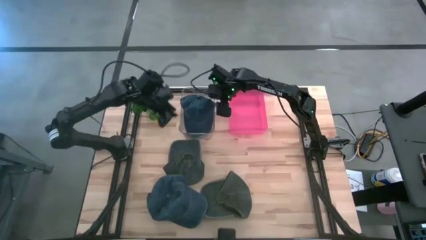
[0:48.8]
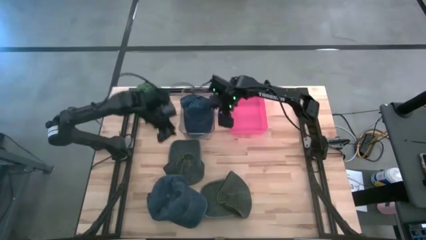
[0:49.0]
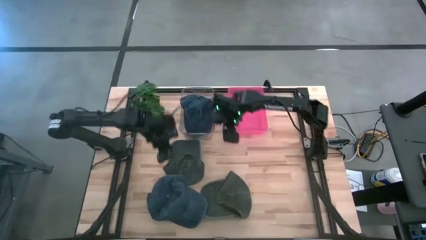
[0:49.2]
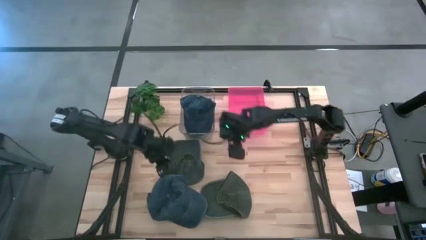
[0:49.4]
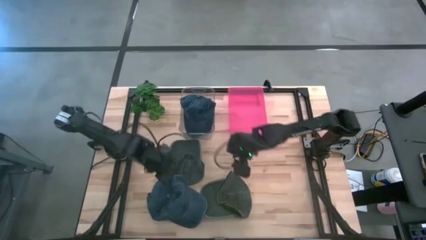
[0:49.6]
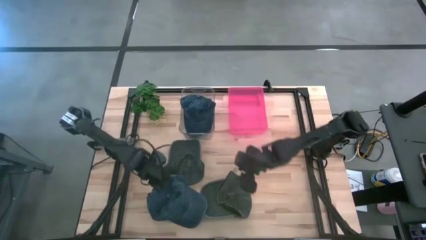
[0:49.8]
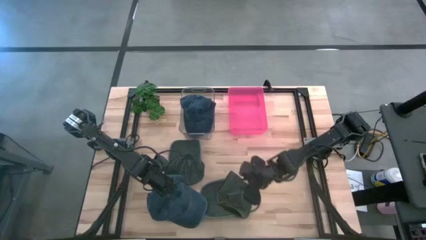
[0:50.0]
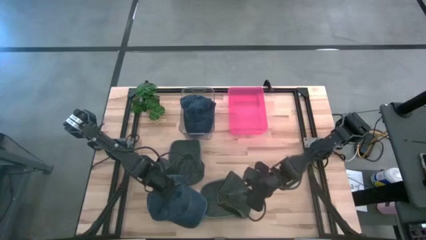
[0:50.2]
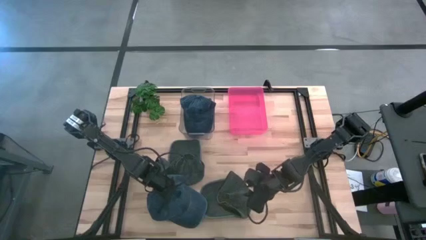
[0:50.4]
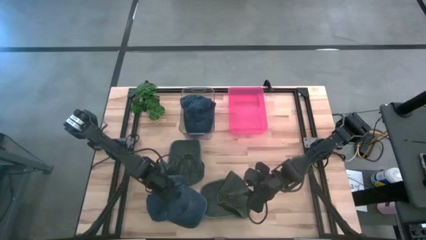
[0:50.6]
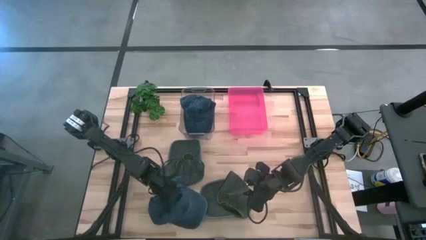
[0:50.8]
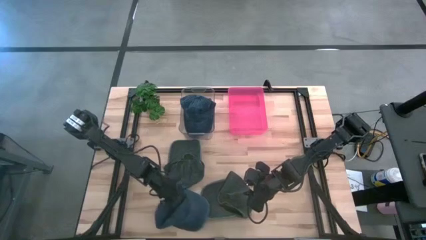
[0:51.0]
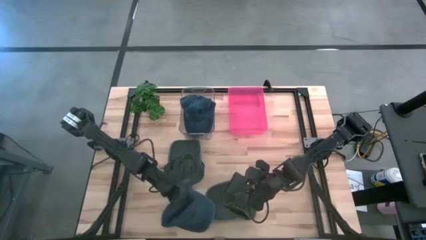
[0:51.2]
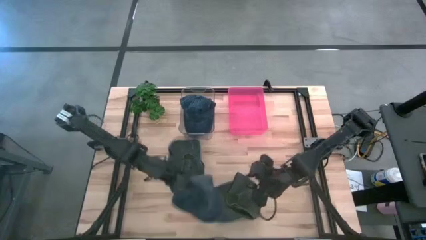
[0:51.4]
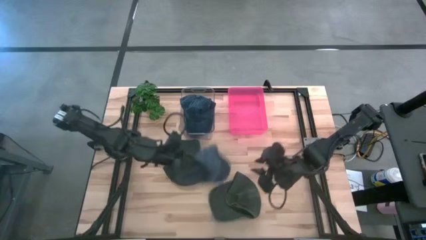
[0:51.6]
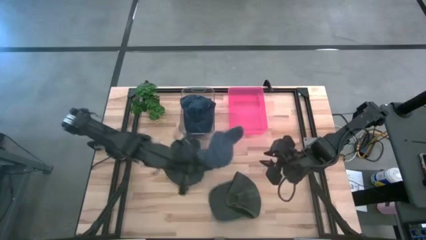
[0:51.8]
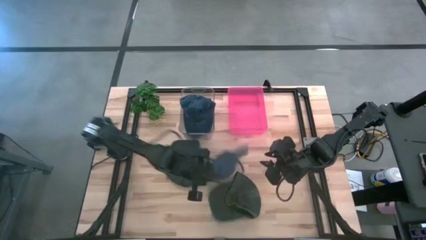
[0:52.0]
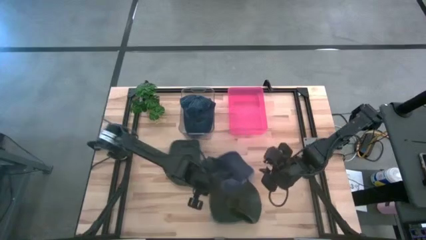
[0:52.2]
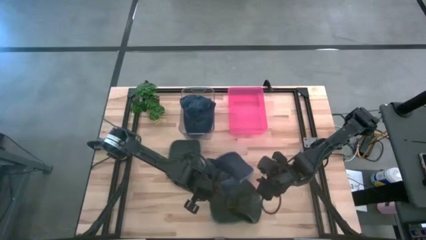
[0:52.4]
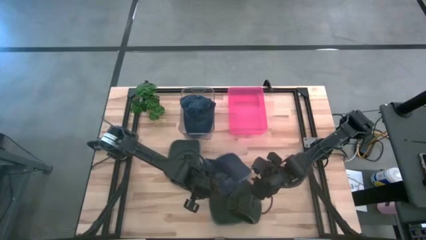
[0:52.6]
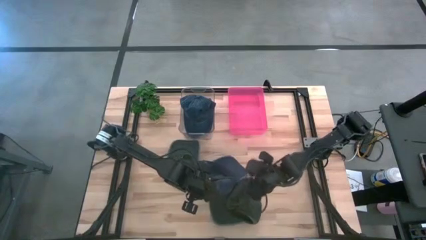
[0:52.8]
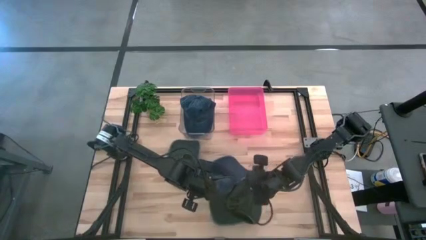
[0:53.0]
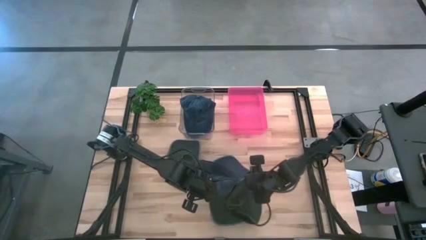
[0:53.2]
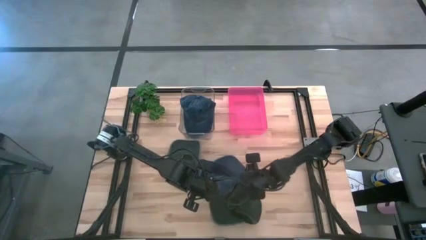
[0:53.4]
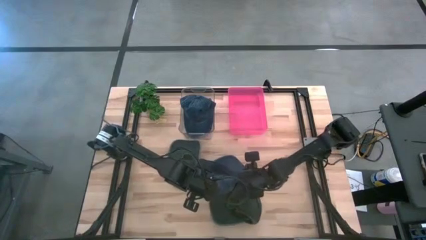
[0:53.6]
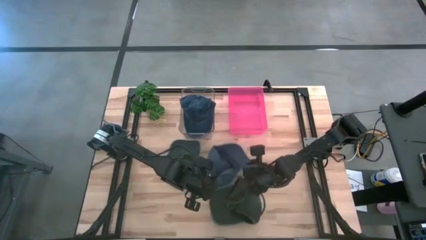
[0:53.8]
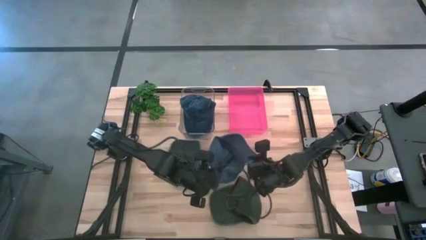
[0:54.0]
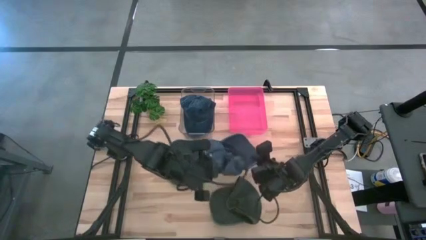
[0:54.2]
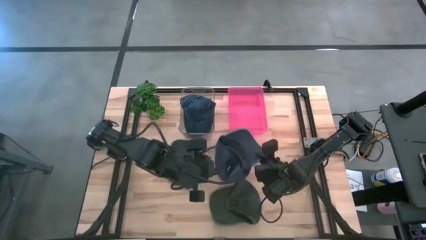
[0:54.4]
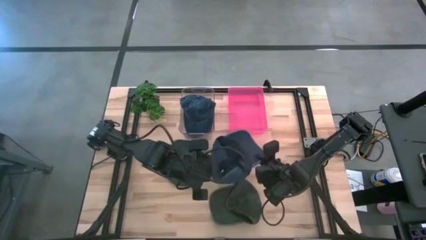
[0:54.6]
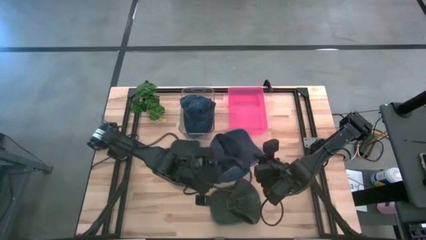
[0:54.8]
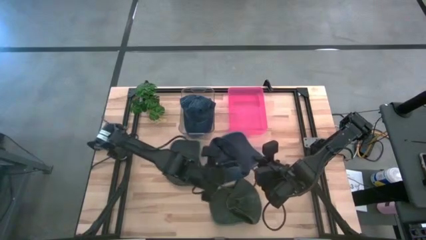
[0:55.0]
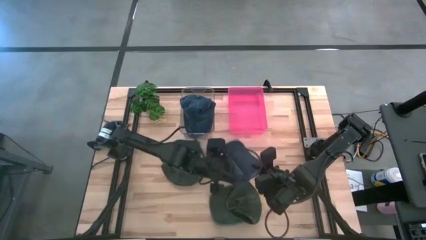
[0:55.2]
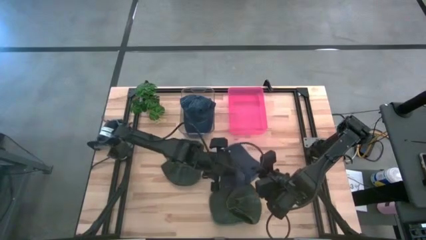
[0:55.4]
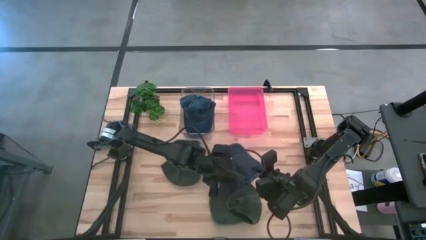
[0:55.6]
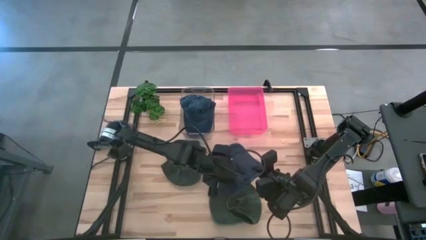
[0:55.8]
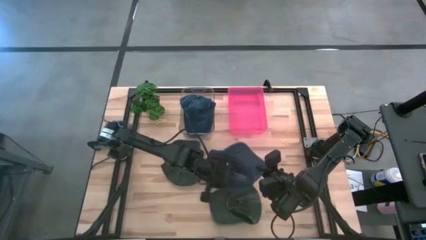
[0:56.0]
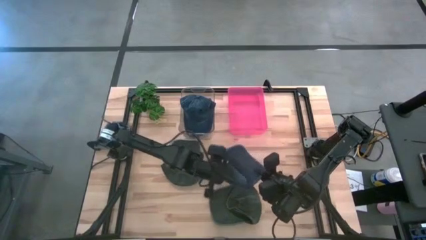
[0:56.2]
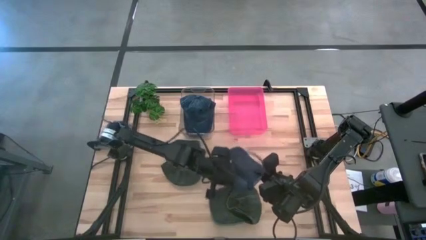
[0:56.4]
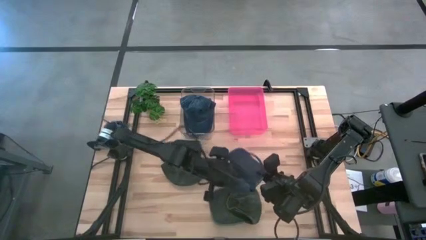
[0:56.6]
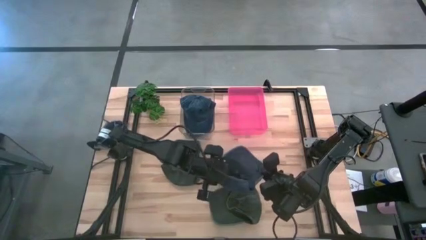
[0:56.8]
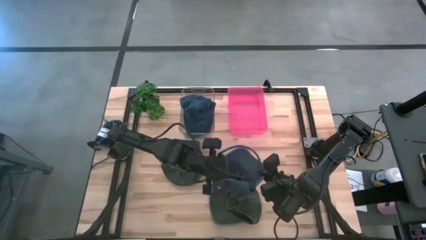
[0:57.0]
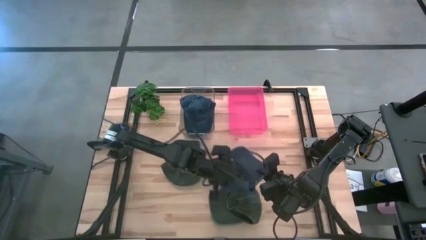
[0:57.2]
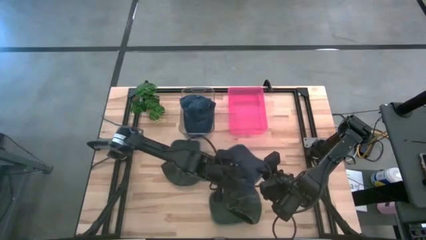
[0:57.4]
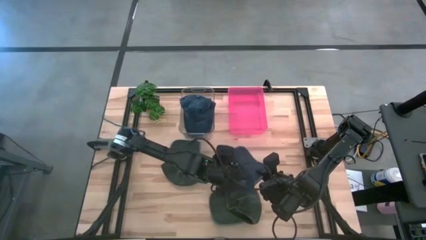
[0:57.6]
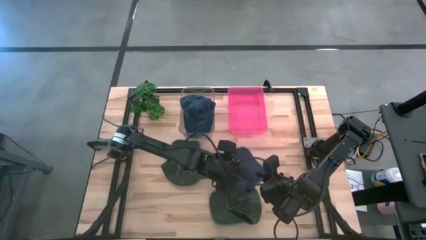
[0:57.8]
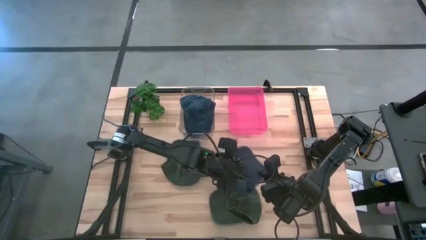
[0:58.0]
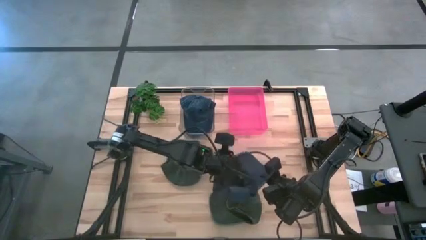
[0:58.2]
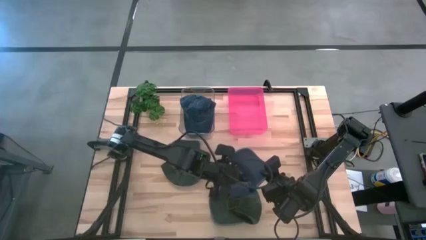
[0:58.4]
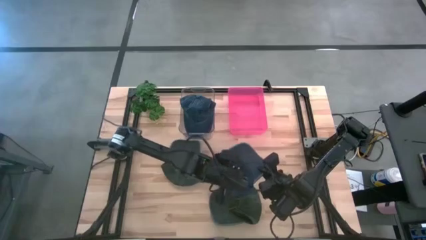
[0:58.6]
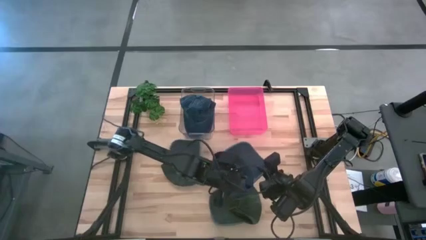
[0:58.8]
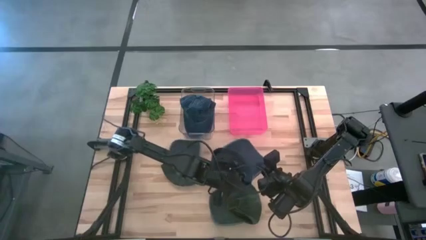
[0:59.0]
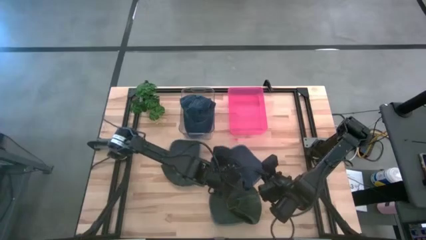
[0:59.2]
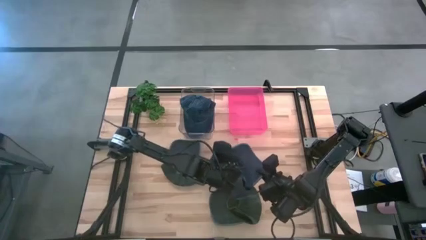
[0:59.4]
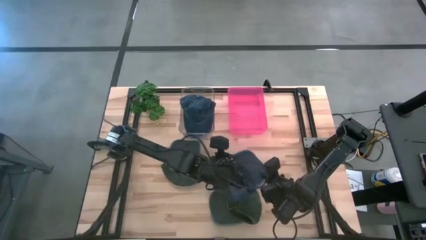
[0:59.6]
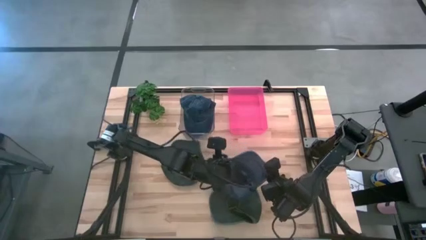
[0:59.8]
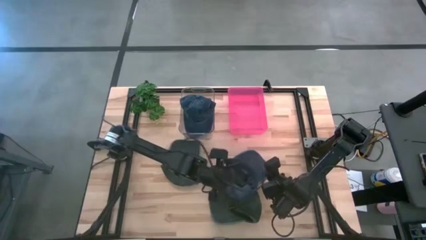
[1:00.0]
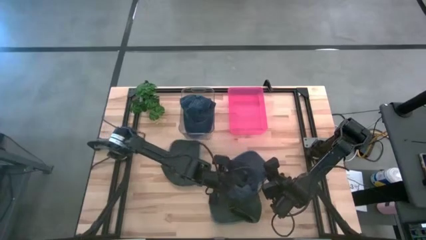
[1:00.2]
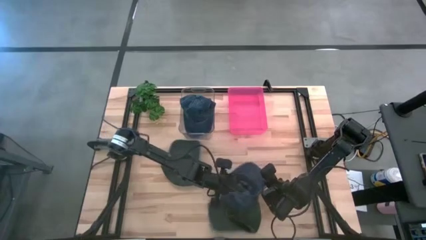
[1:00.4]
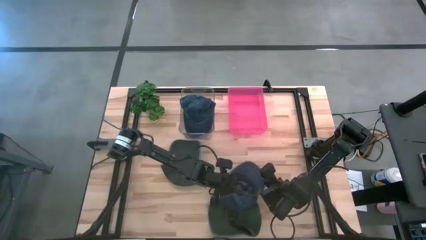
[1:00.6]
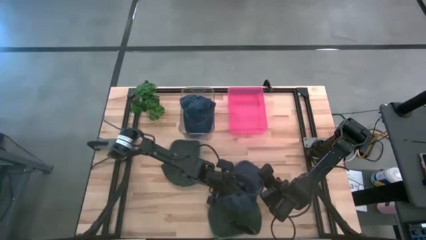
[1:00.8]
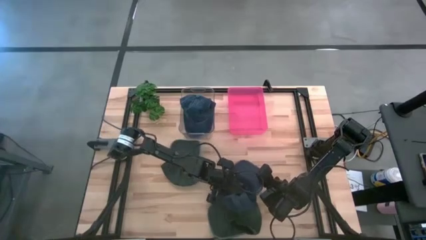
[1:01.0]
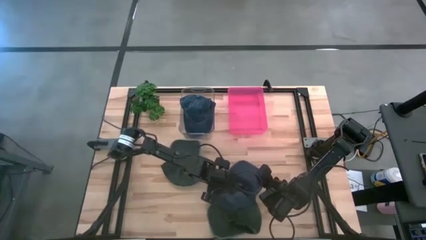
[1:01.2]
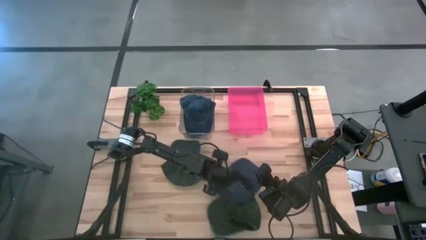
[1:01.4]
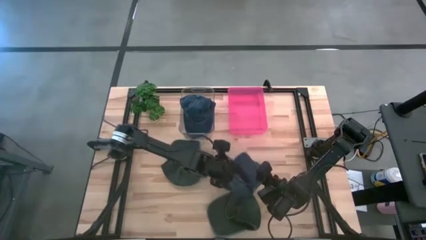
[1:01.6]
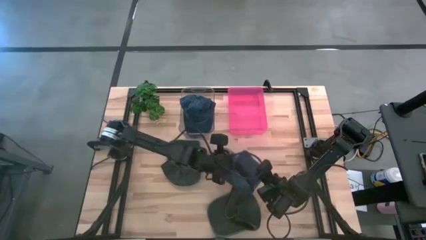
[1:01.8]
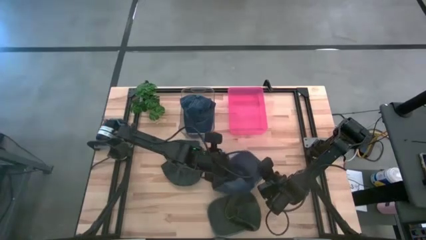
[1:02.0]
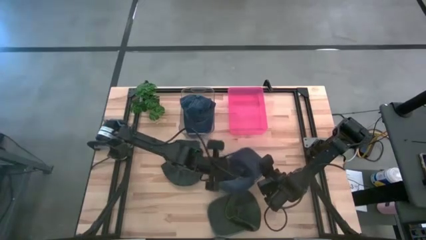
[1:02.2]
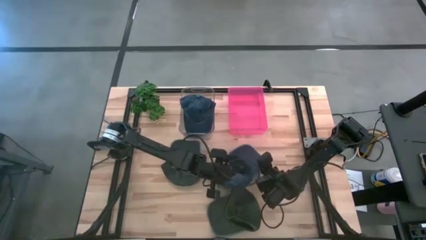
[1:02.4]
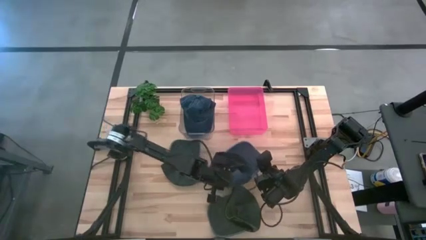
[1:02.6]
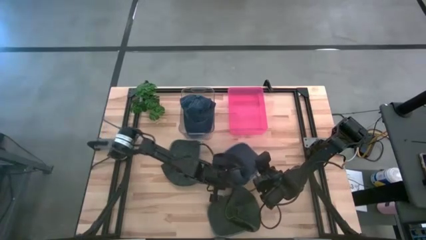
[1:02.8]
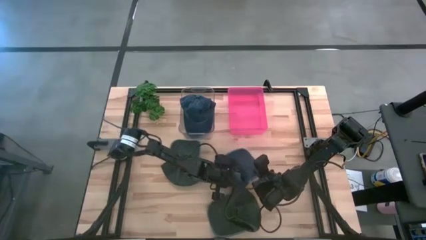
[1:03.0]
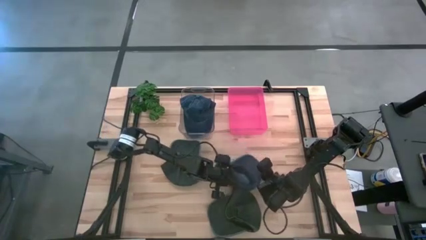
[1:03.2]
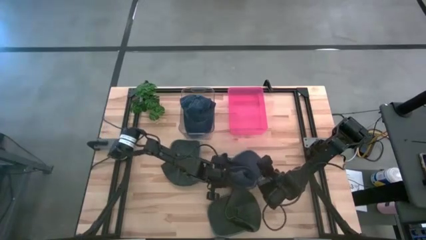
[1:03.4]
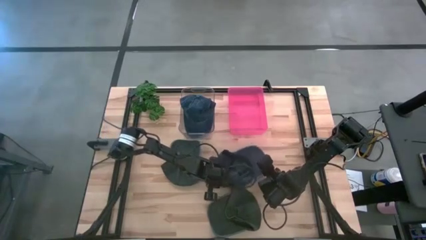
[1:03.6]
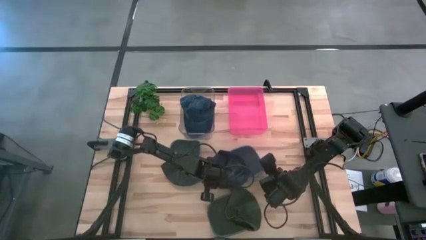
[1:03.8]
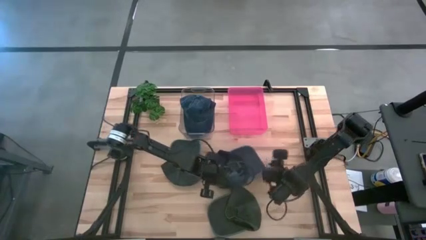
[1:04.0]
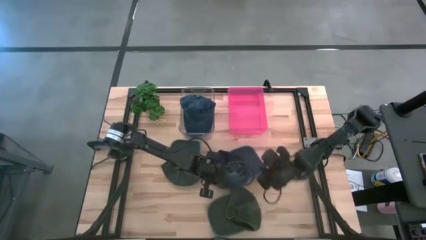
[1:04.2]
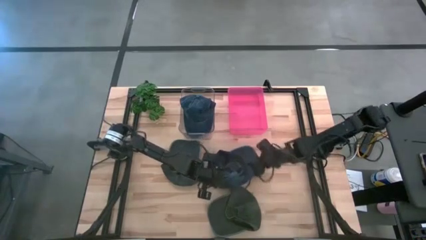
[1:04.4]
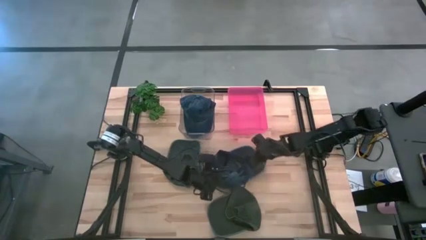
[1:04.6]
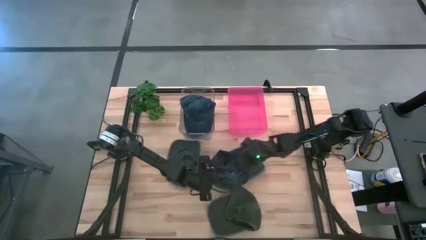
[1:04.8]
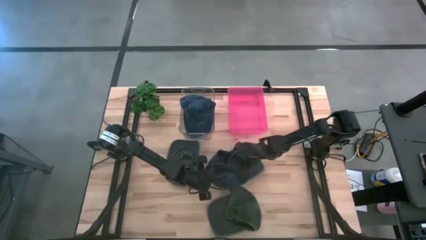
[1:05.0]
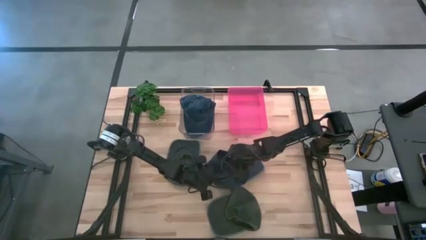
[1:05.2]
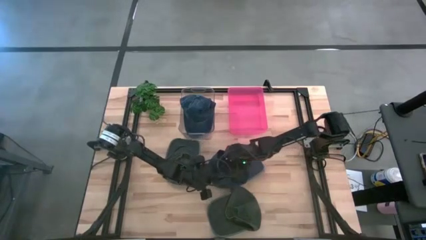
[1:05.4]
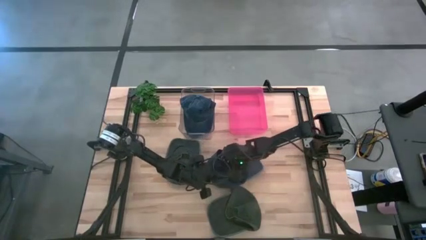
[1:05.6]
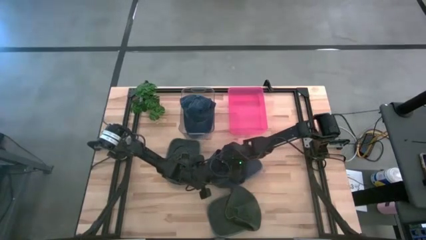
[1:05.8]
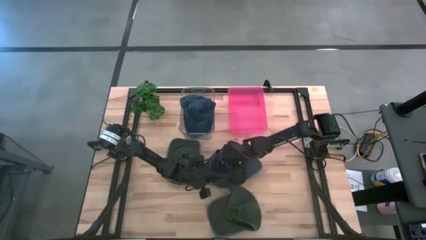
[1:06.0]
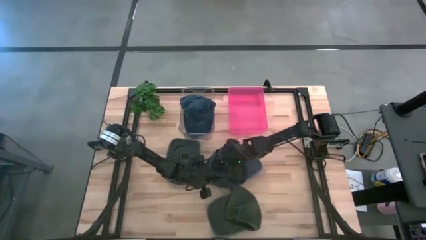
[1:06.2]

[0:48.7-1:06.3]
Task: Pick & Place hat
Put the blue cap into the transparent bin
